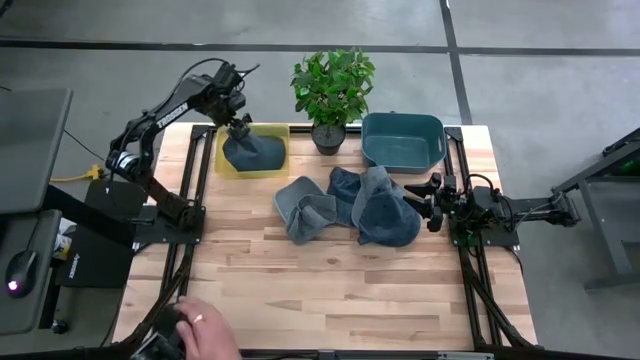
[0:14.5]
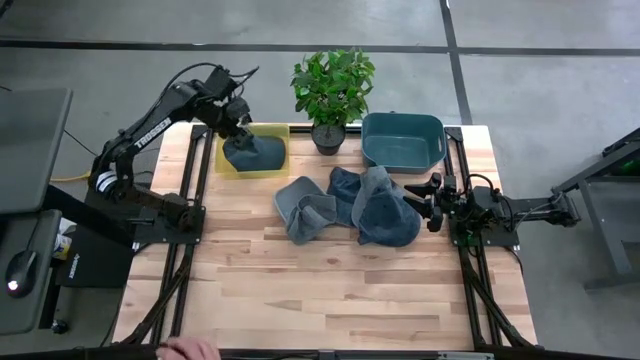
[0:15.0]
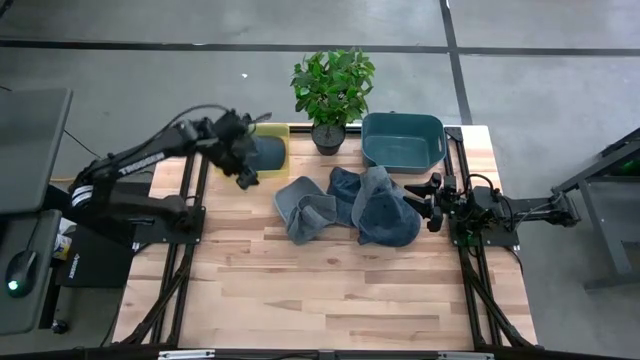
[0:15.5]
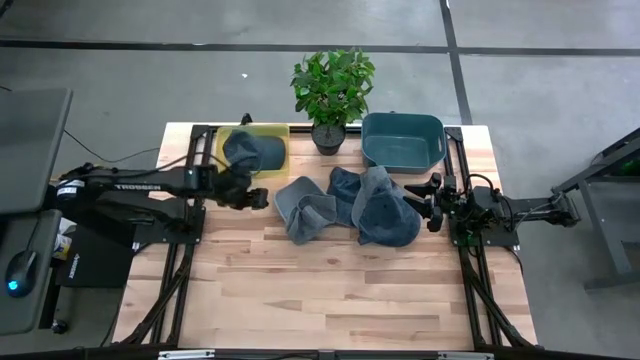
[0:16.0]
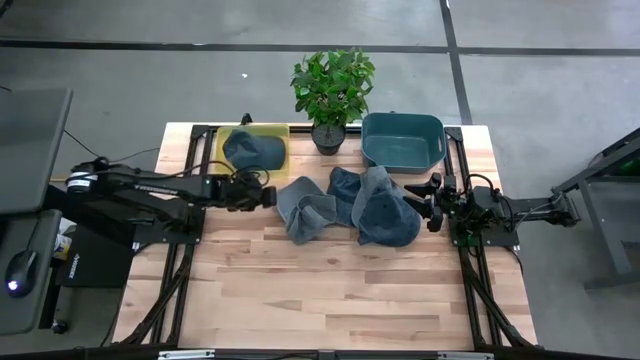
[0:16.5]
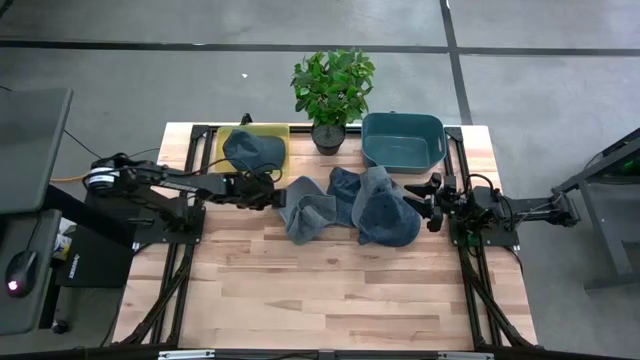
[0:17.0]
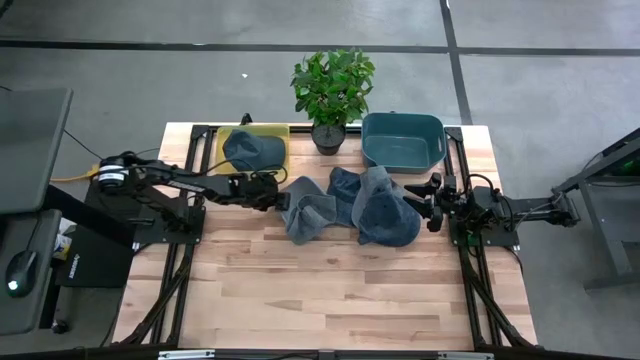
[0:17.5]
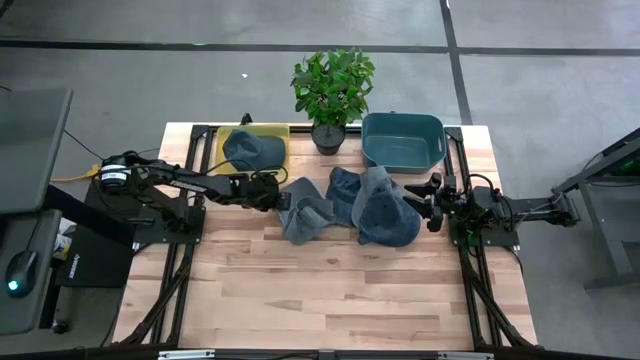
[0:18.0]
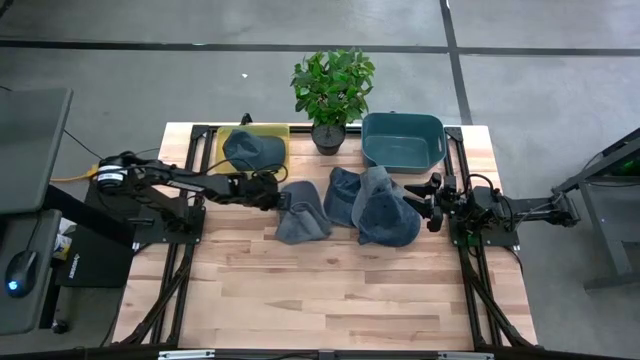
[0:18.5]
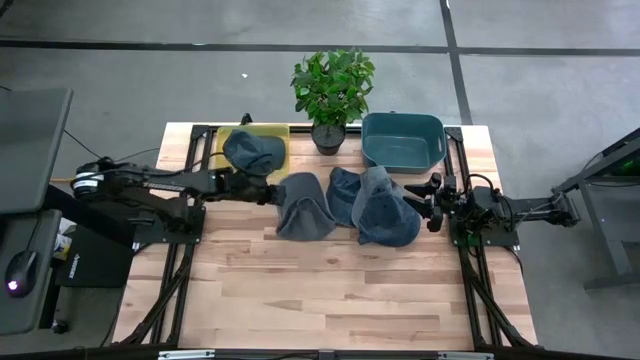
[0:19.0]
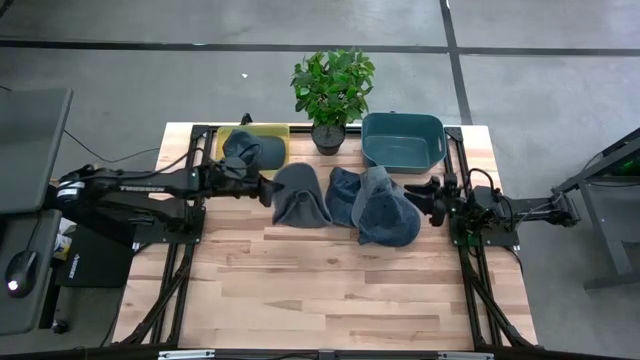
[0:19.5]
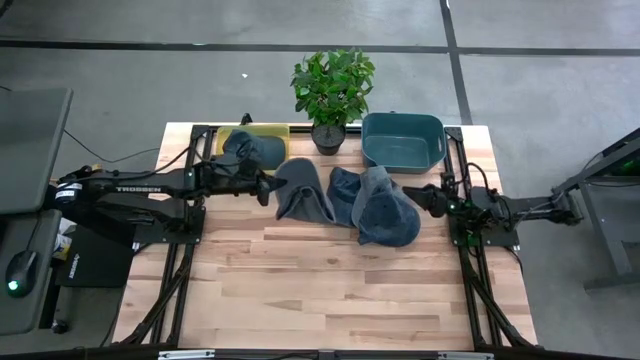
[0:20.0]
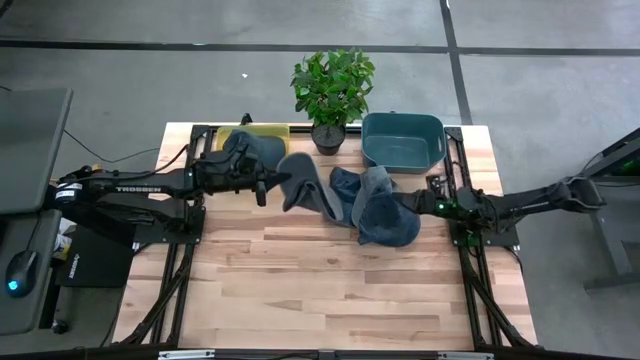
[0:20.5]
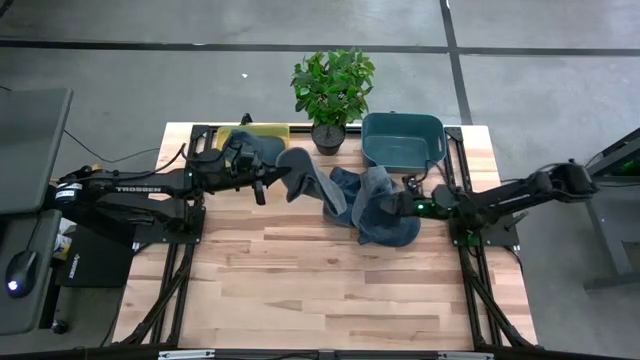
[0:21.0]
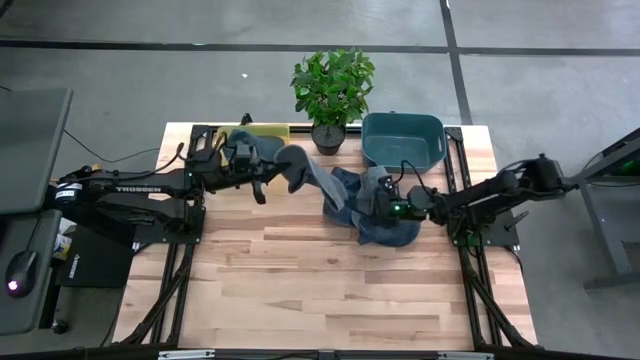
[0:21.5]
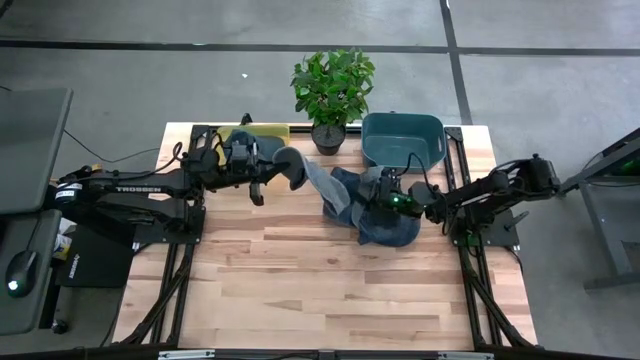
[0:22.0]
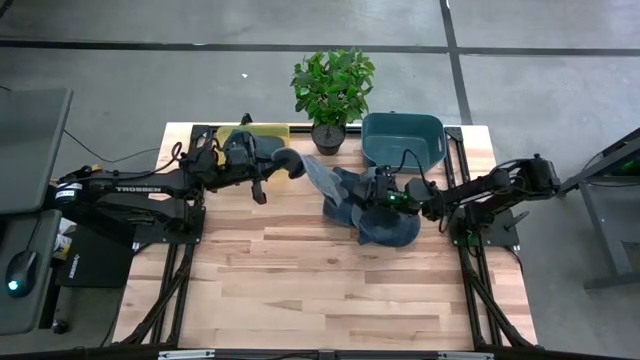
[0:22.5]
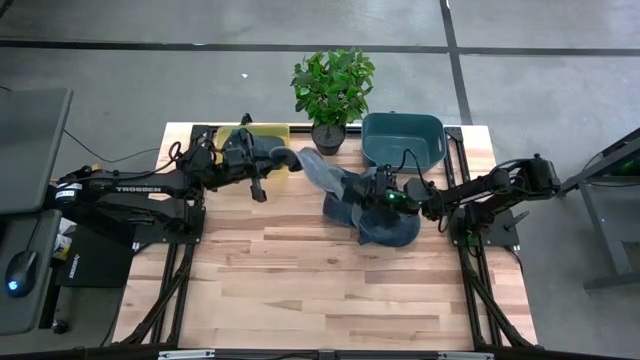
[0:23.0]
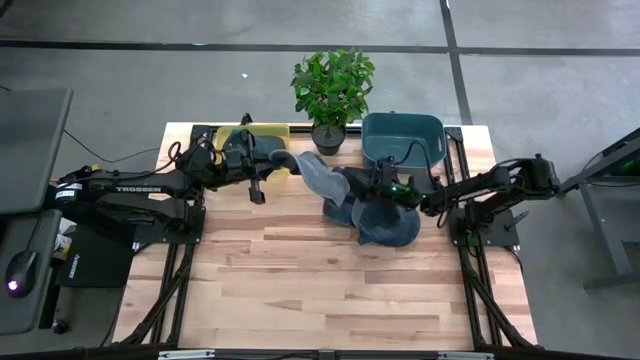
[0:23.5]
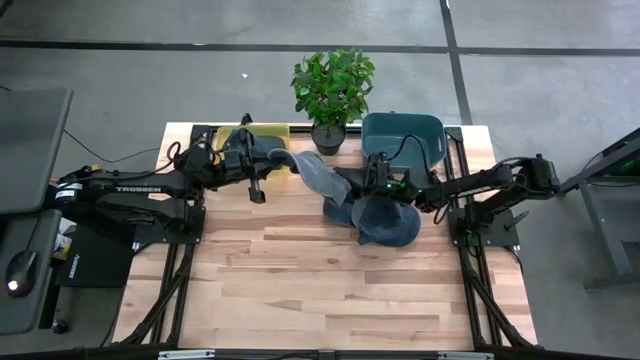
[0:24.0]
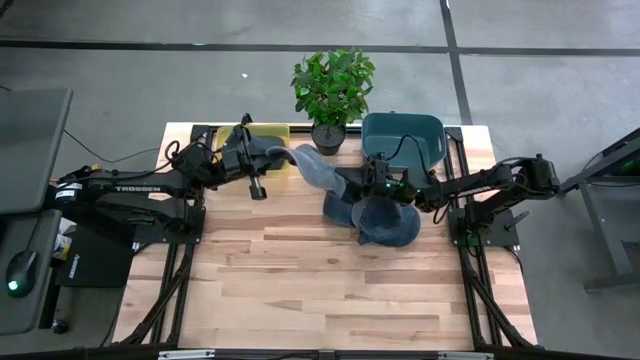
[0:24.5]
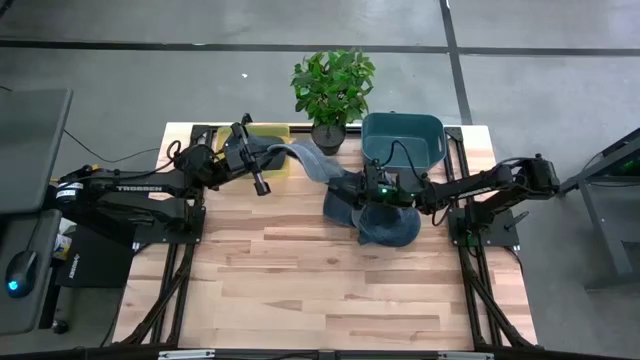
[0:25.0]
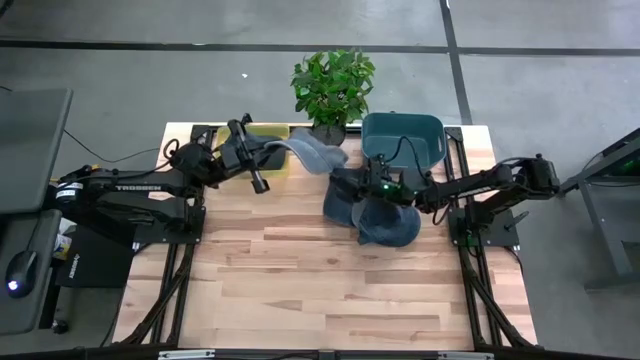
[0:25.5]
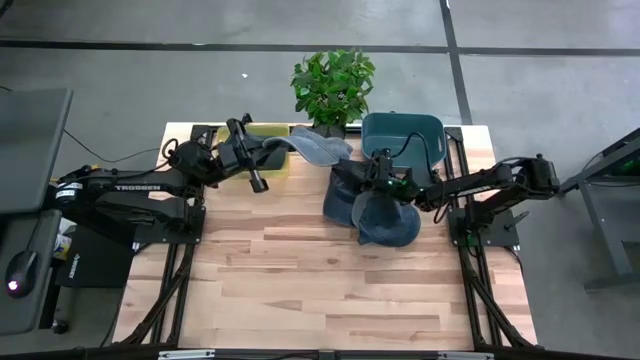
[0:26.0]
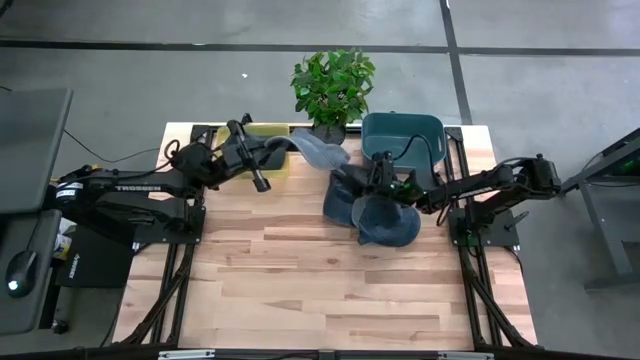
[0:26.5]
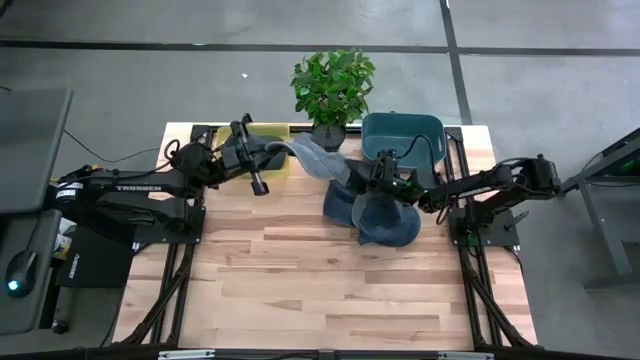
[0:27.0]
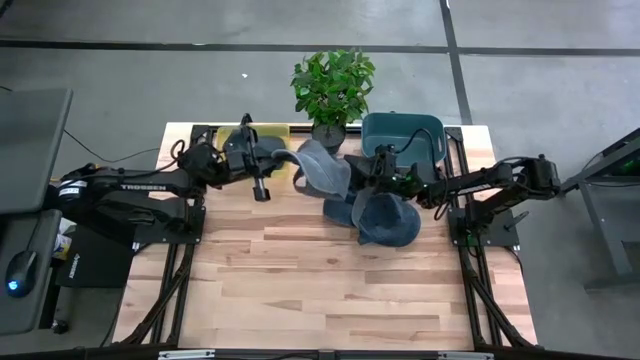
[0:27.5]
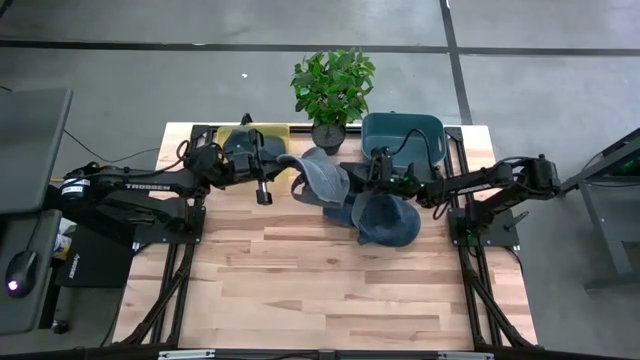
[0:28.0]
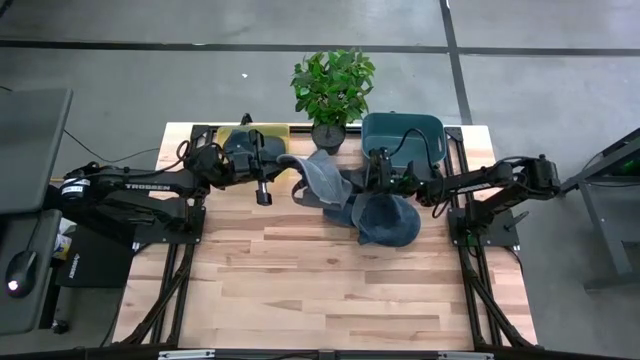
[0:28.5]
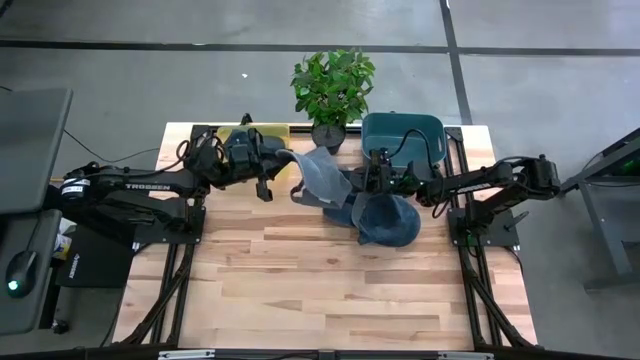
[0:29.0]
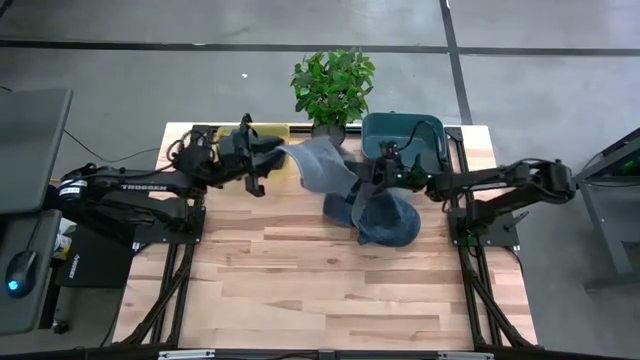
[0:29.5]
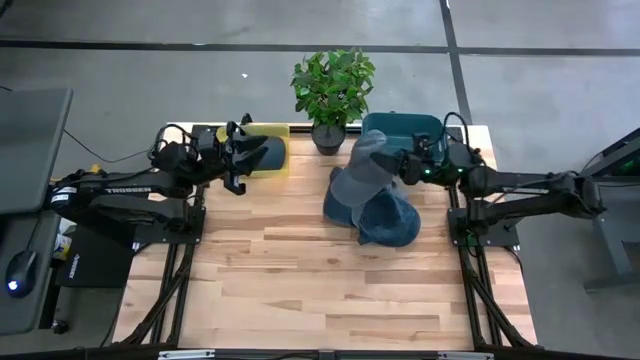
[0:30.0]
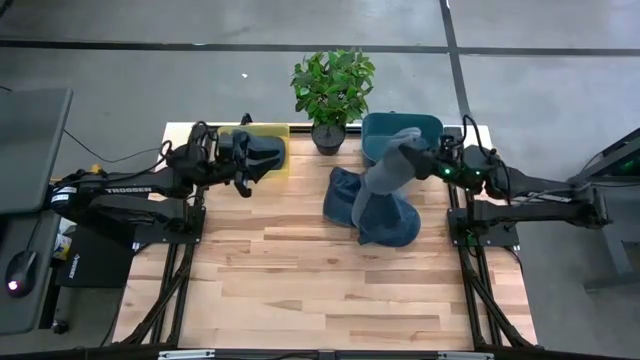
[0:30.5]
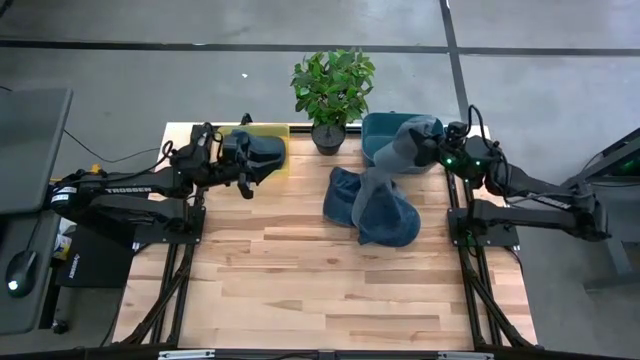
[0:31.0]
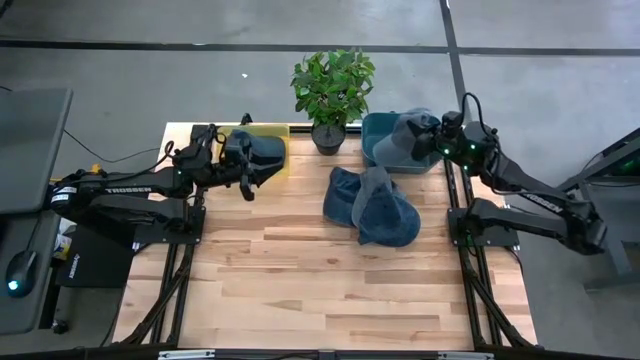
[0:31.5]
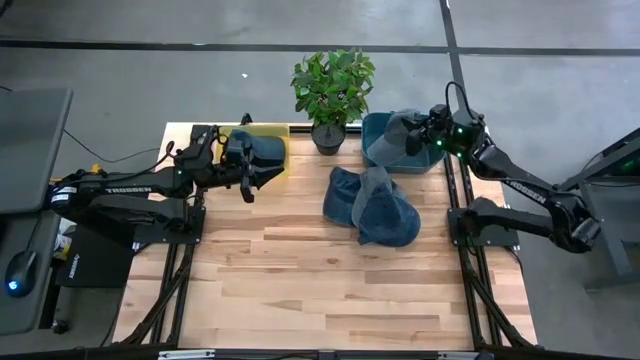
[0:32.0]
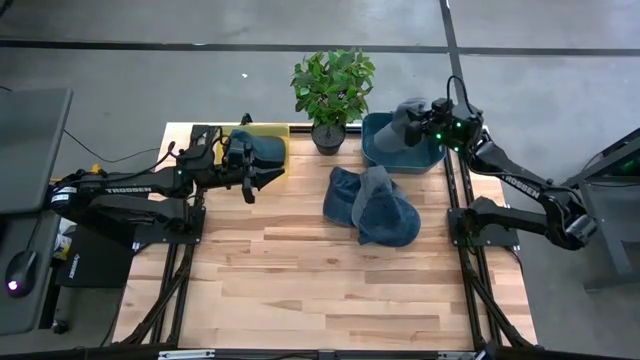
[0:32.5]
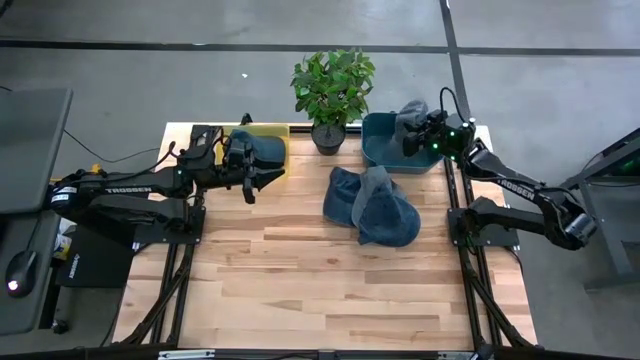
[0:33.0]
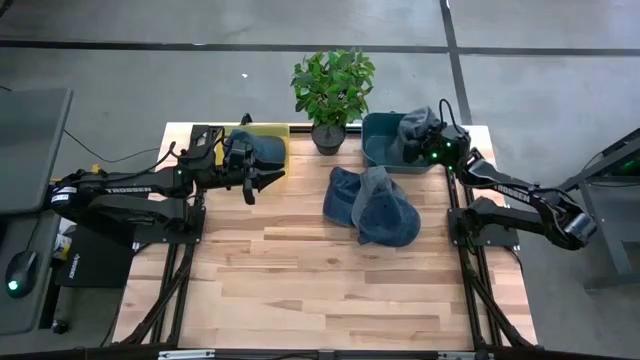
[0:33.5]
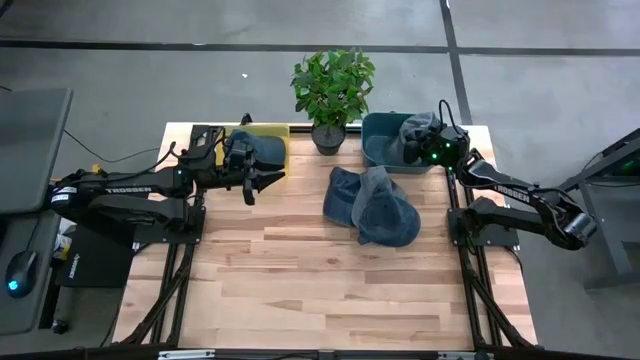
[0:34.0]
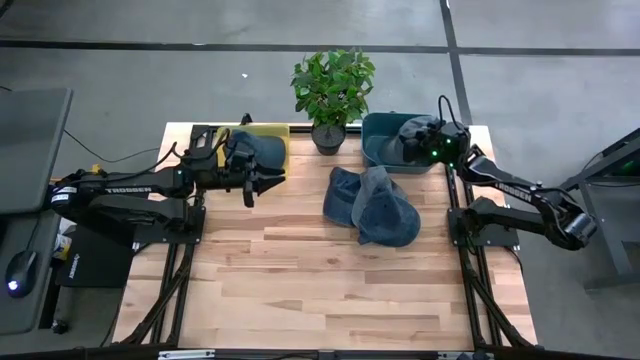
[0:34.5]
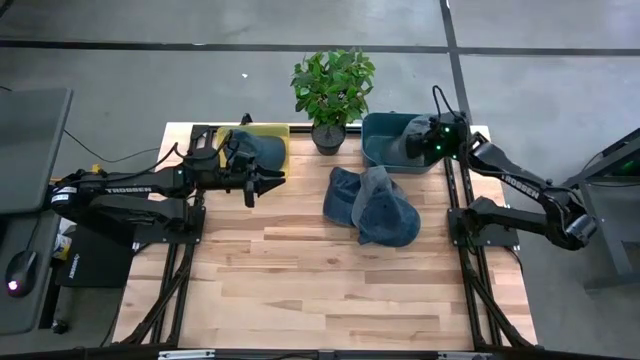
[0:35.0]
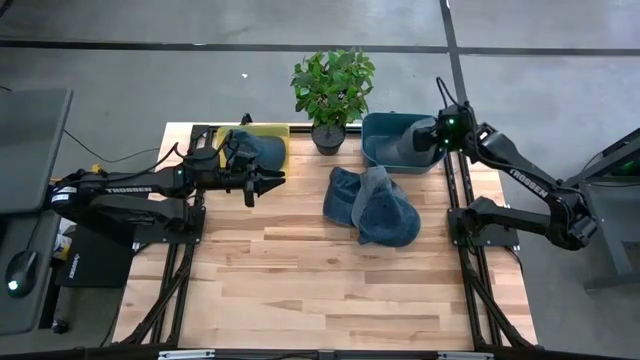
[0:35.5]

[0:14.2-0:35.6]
Task: Pick & Place hat
Put the left gray cap into the green bin
